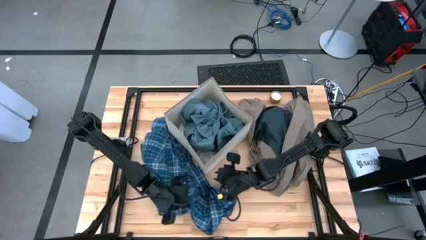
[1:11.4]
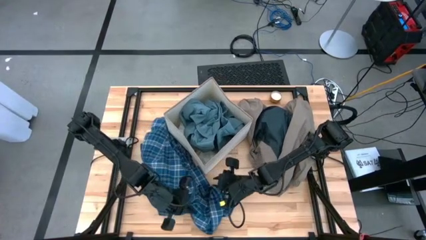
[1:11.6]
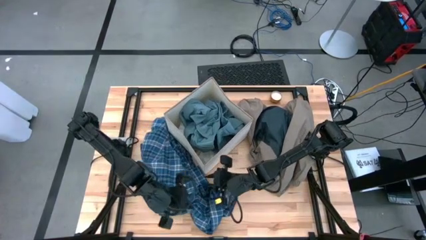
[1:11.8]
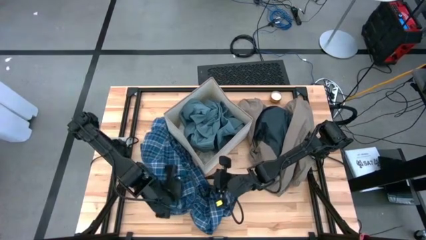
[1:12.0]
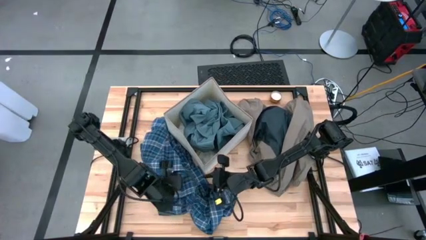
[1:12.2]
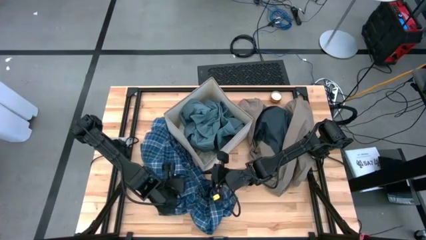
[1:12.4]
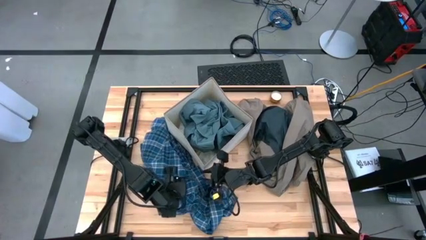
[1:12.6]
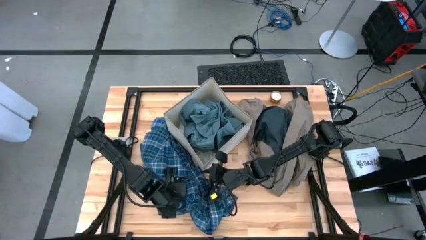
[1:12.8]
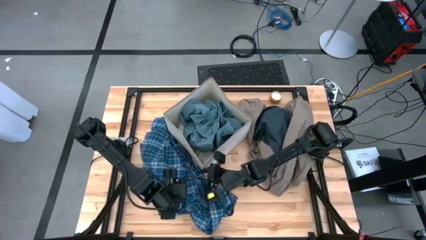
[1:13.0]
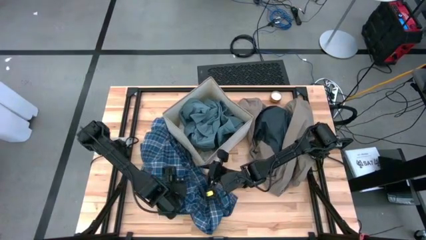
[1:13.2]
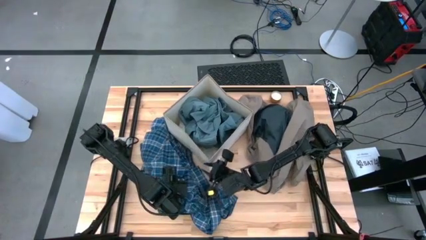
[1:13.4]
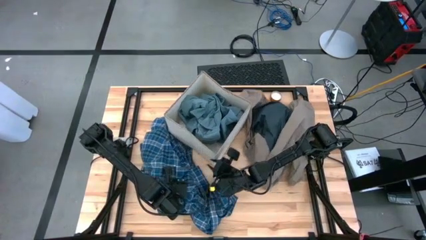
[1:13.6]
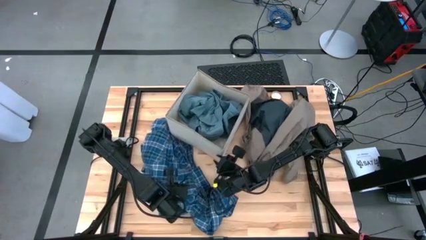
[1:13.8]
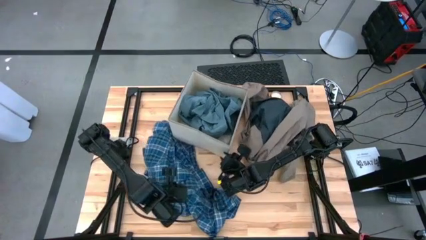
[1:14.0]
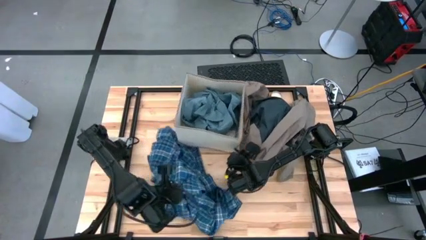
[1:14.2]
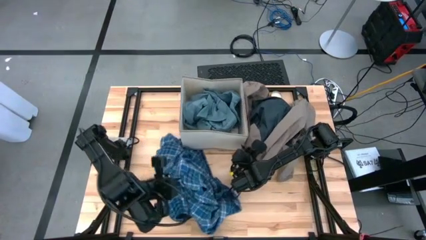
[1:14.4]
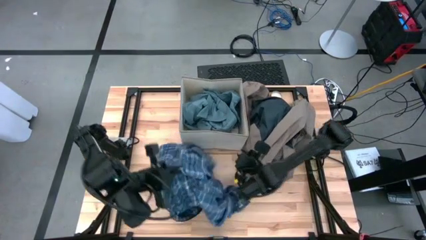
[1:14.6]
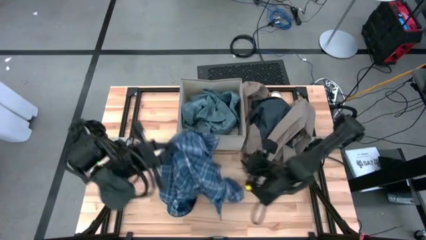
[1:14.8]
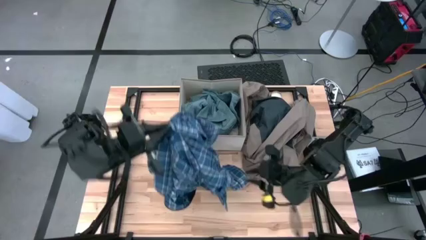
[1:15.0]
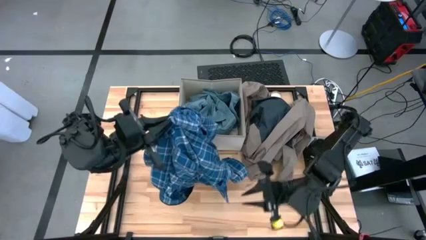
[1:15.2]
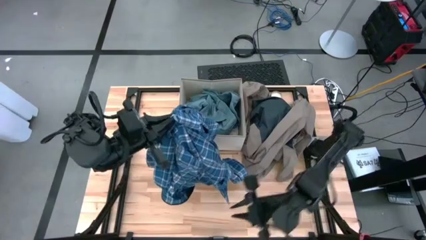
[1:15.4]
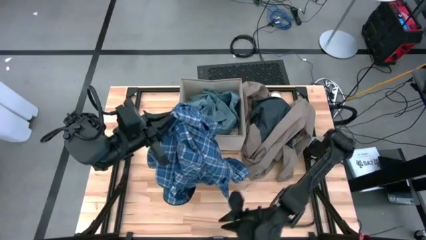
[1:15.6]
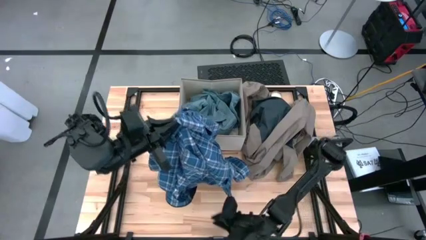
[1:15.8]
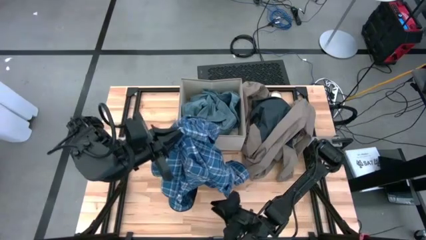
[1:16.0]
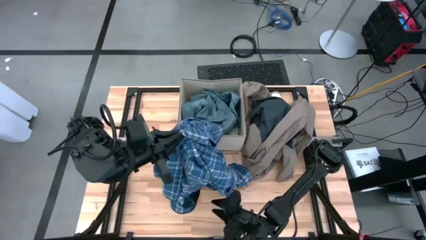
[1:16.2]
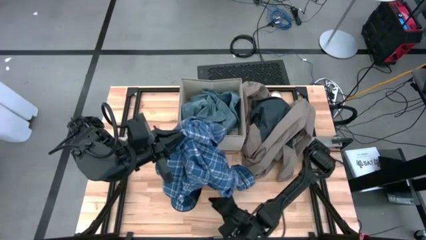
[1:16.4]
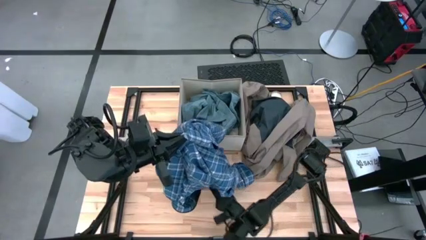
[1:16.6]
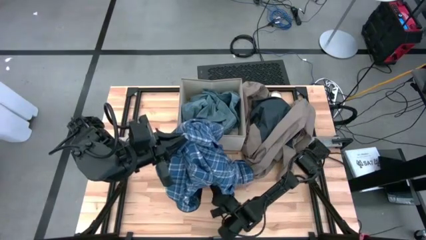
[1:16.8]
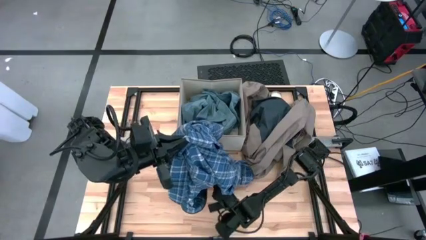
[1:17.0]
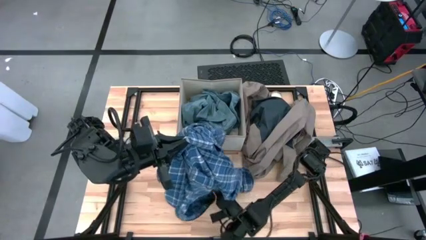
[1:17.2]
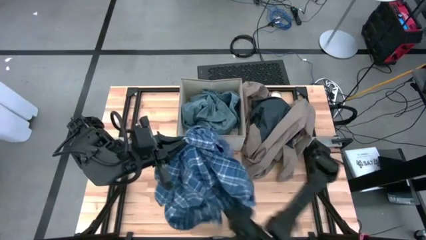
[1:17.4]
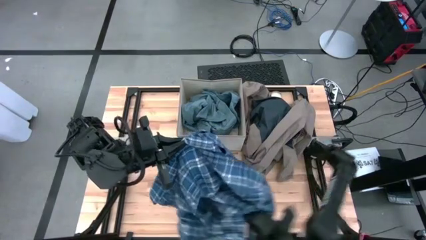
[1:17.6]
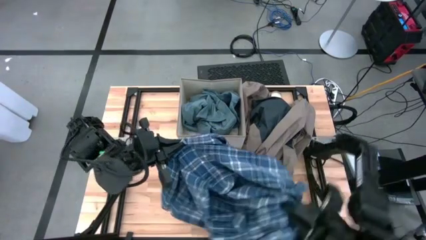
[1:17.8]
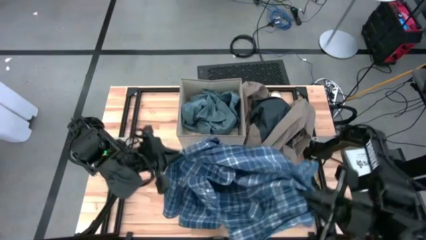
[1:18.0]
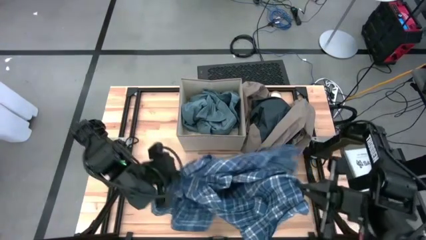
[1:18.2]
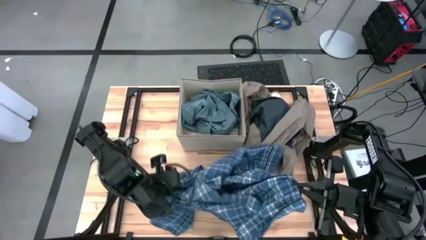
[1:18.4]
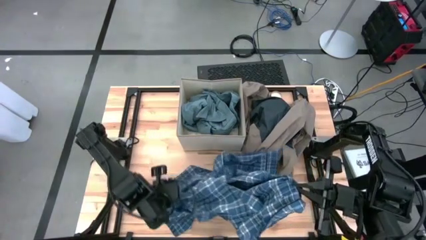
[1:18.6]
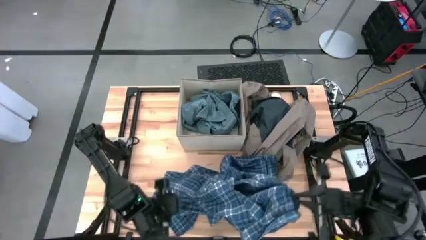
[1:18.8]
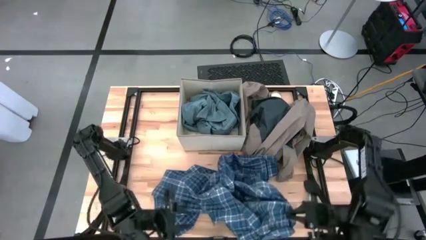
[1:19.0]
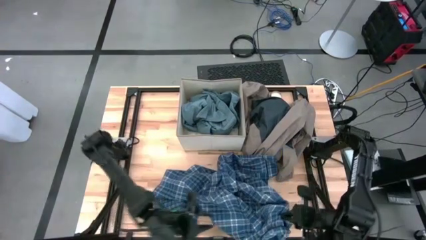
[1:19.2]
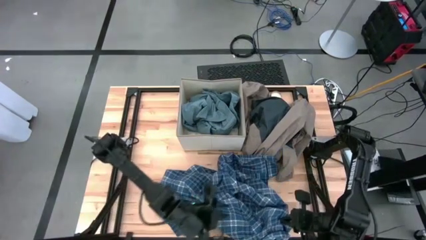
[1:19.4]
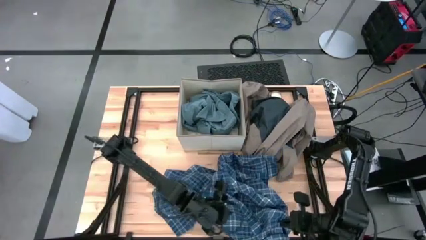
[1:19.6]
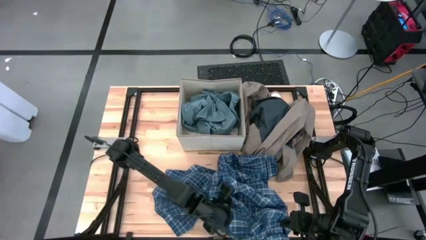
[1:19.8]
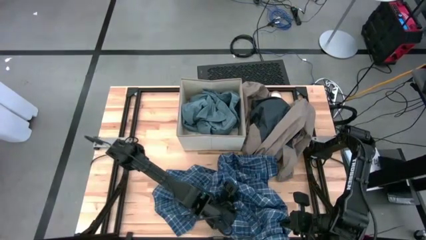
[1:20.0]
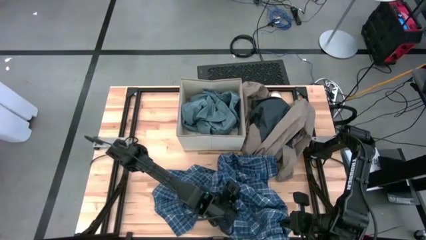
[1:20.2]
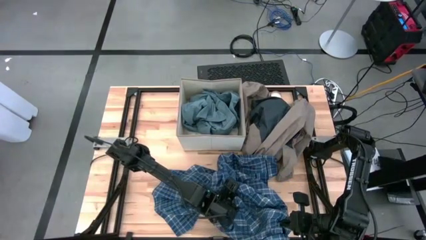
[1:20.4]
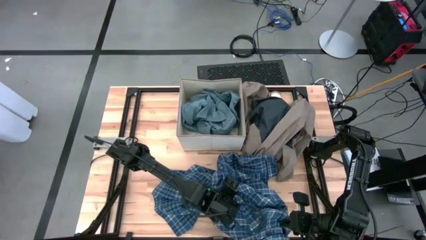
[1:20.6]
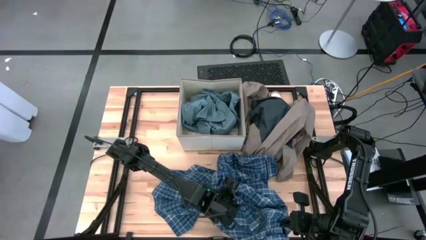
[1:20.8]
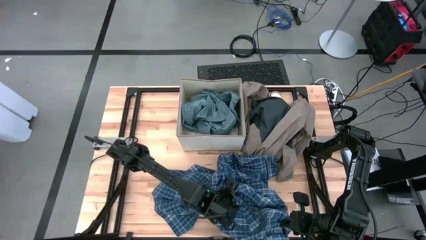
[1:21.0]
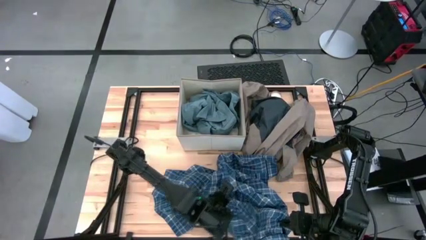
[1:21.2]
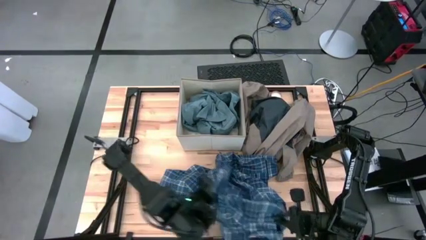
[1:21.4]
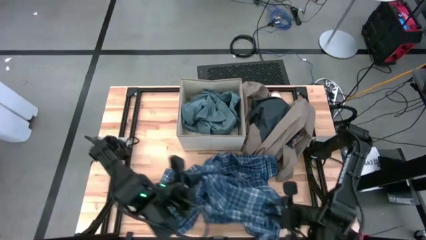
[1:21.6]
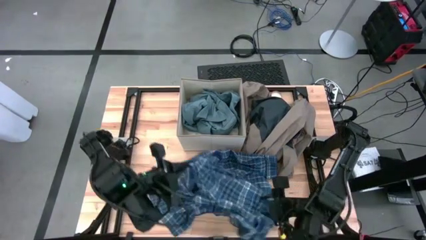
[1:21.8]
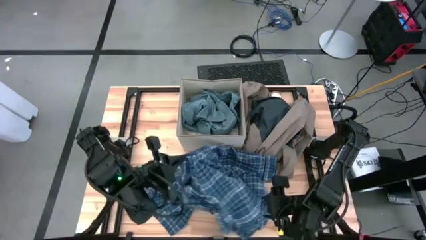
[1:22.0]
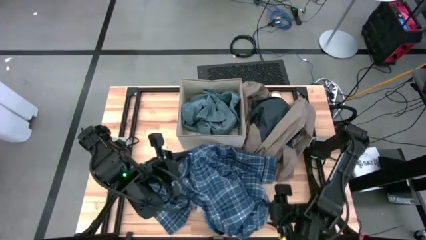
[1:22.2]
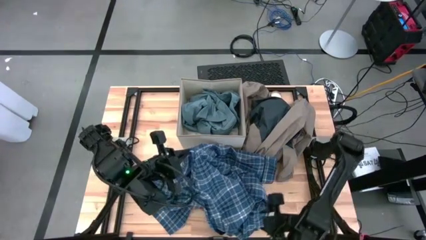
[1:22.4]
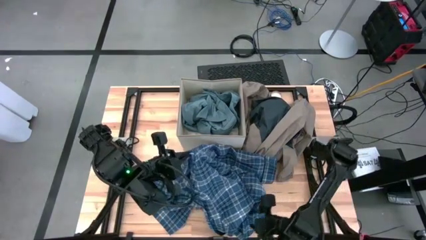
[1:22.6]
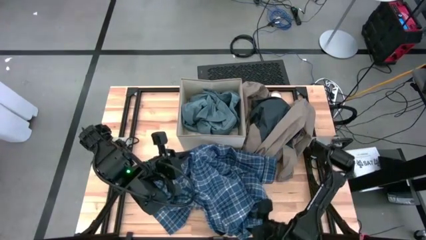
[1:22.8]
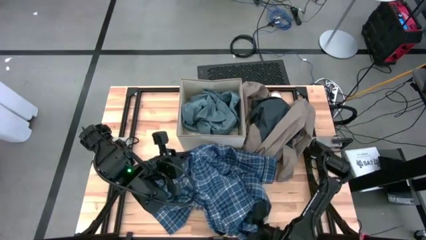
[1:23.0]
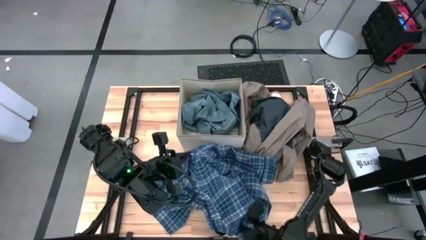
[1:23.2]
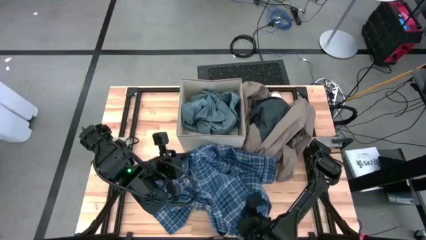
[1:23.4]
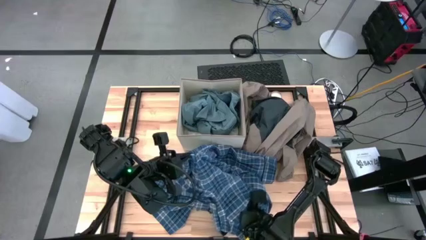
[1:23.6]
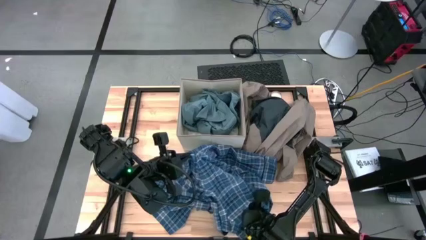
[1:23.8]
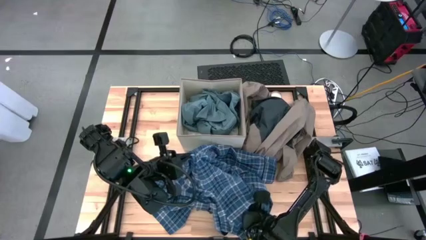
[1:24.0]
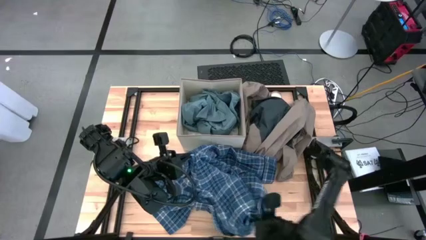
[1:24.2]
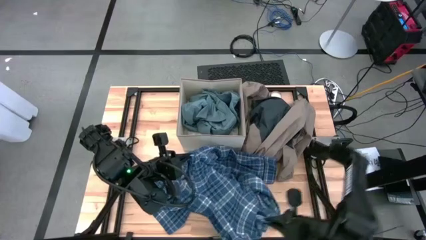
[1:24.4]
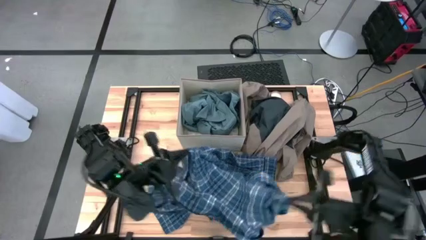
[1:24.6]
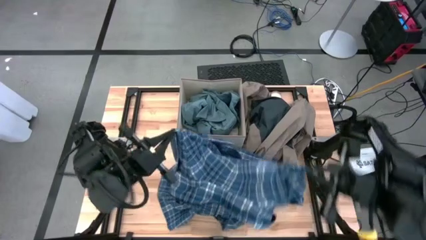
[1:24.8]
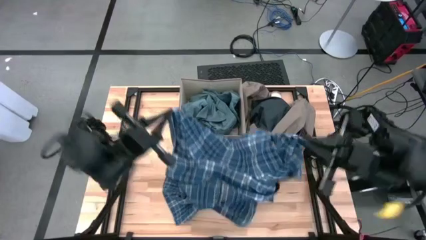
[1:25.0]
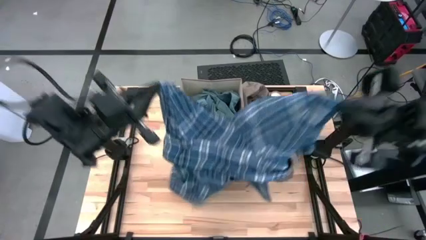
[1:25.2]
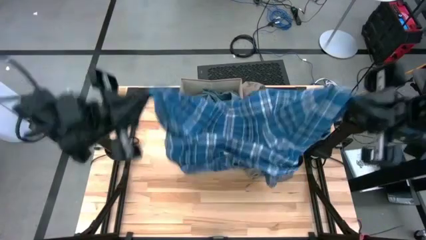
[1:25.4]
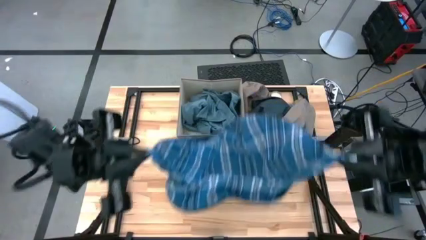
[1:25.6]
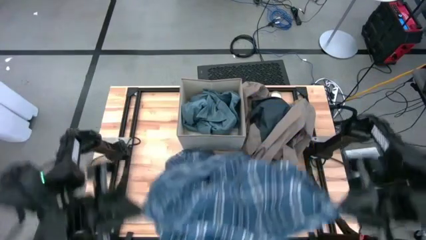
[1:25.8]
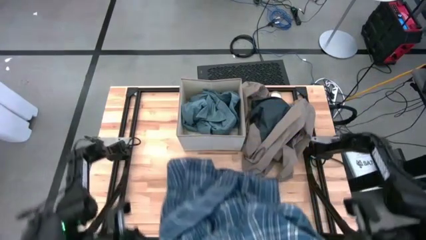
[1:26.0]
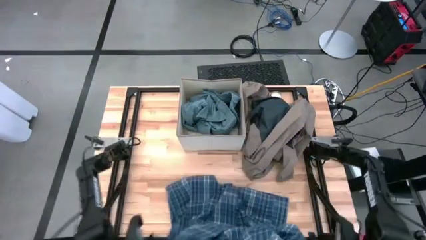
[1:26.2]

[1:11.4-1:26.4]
Task: Sort clothes
Put the blue polo shirt into the laundry organizer
